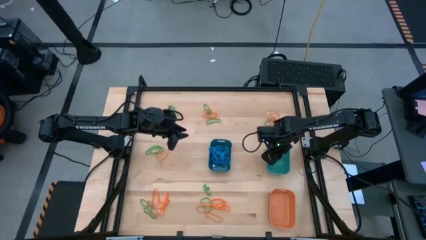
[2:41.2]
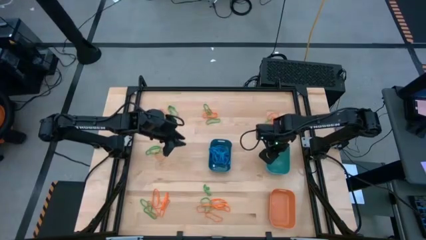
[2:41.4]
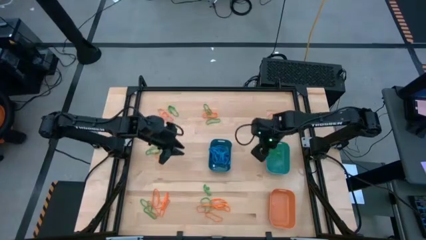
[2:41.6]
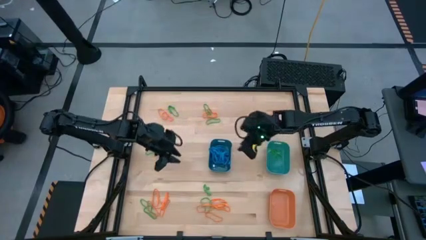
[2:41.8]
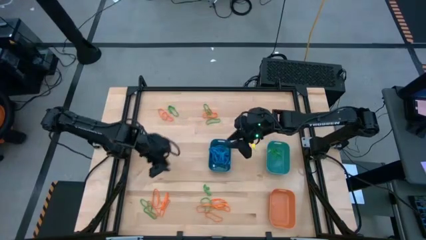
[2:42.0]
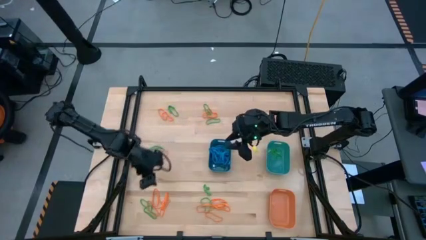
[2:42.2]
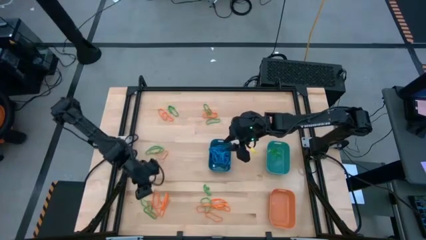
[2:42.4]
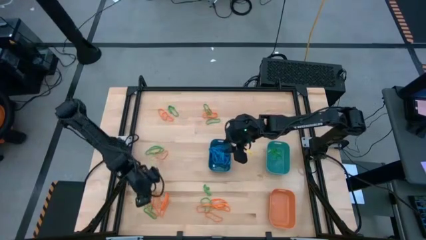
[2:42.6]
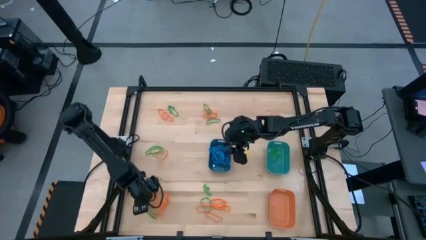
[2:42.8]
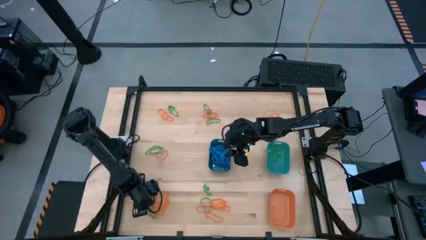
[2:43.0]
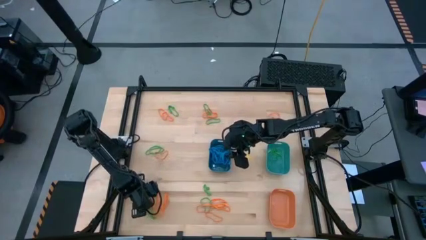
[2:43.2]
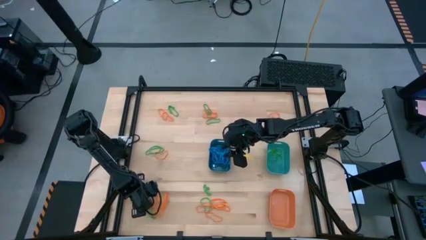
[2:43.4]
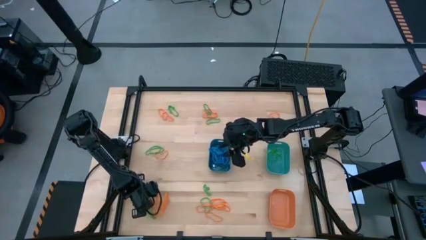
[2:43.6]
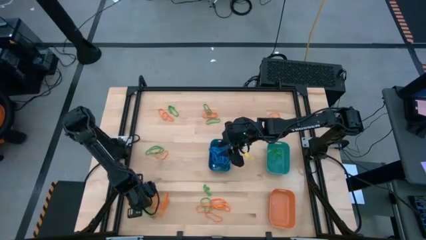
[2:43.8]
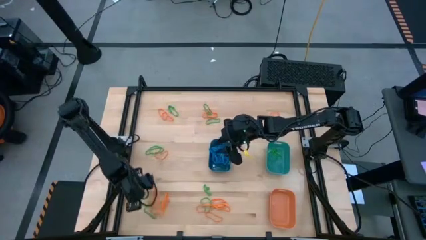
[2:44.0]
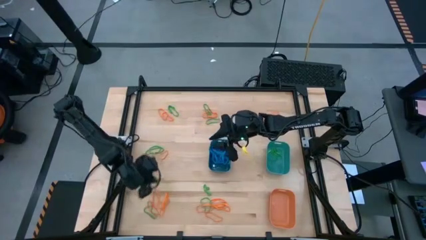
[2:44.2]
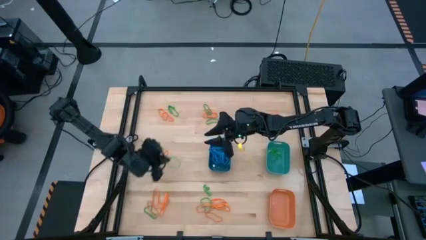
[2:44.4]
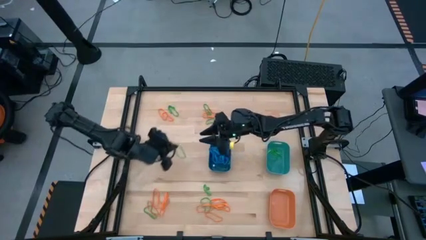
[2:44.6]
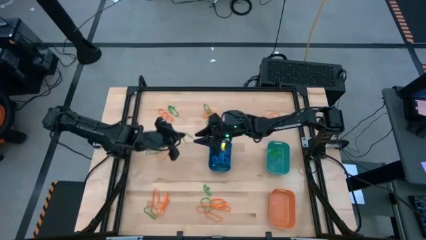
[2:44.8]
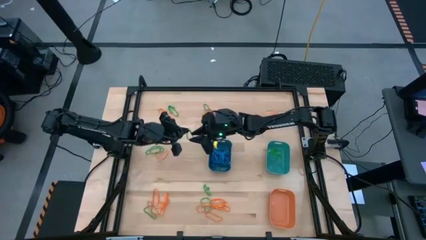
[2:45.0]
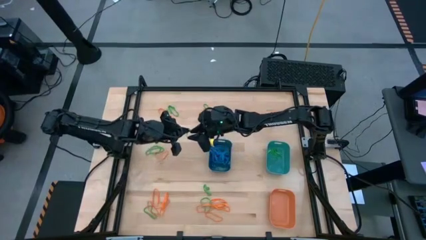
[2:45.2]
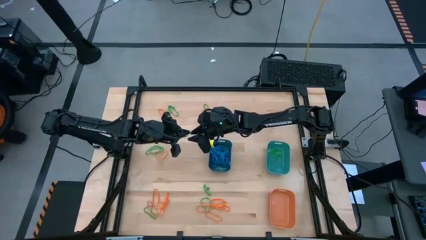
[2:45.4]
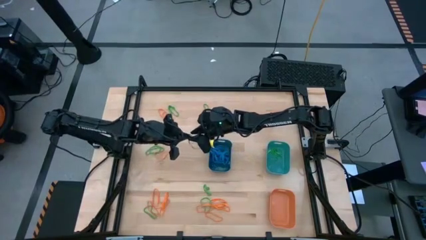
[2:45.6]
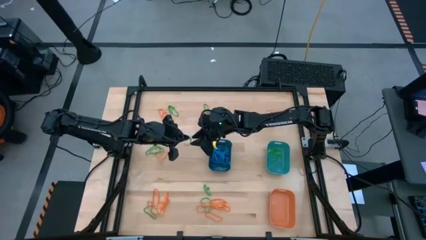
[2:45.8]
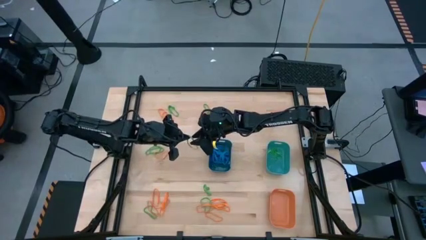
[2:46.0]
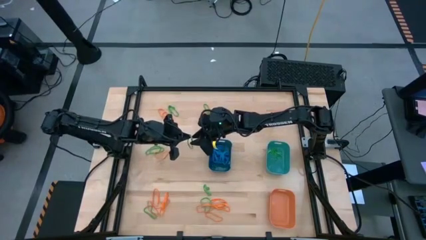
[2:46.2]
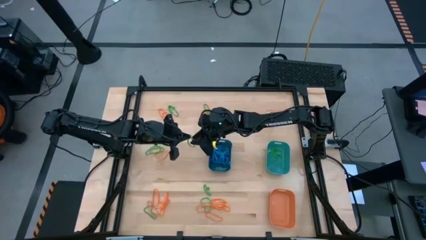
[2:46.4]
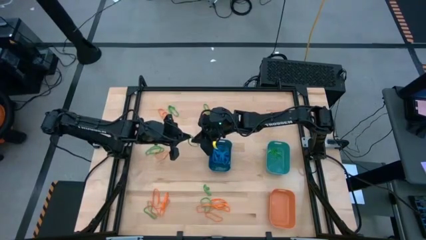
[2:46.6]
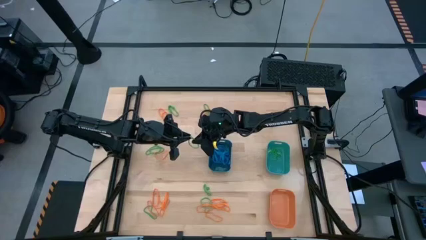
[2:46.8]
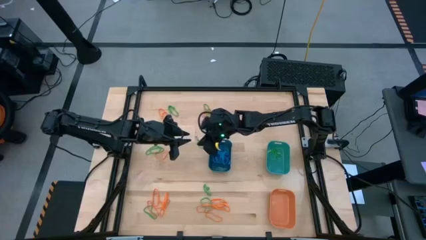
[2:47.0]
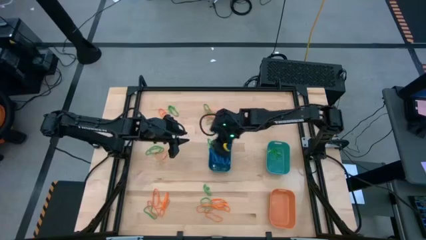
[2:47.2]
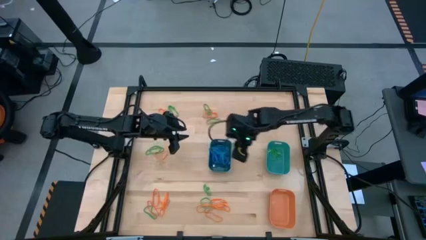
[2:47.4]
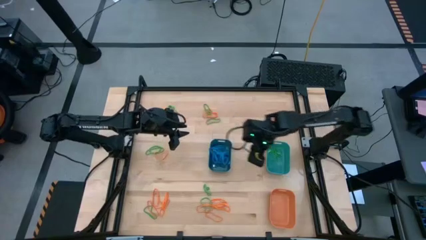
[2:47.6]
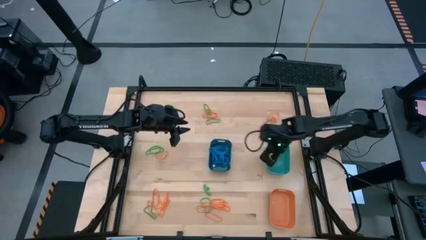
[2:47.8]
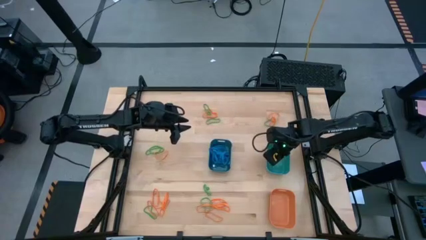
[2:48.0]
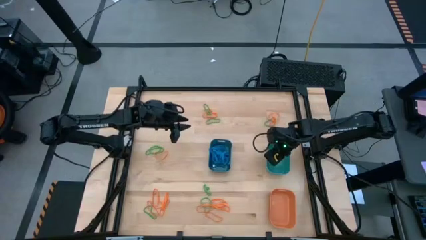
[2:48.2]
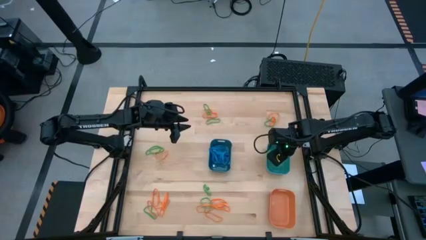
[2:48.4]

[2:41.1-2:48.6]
Task: Sort rubber bands into baskets
Put the green rubberband into the light blue bin

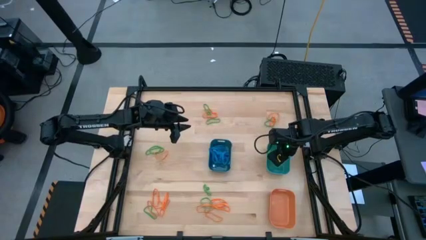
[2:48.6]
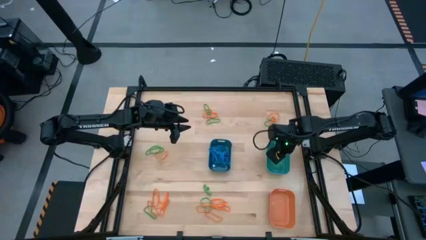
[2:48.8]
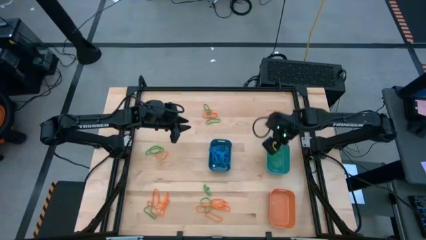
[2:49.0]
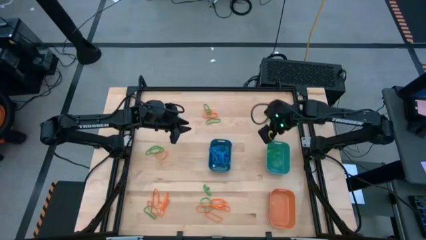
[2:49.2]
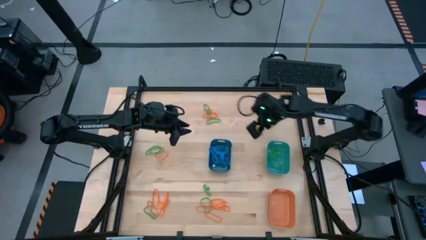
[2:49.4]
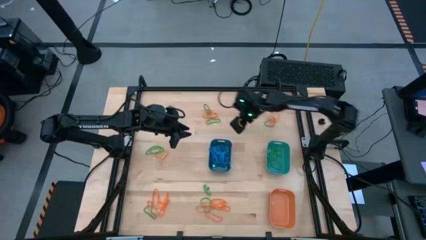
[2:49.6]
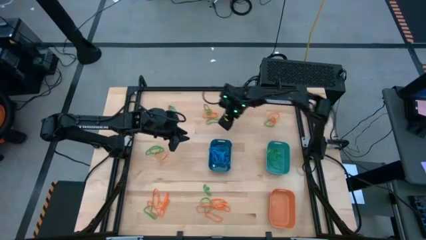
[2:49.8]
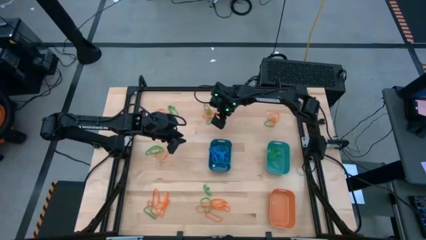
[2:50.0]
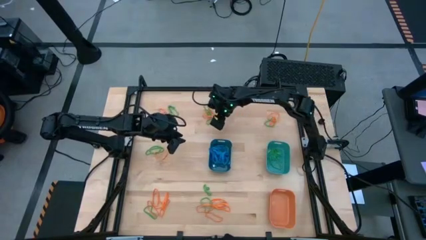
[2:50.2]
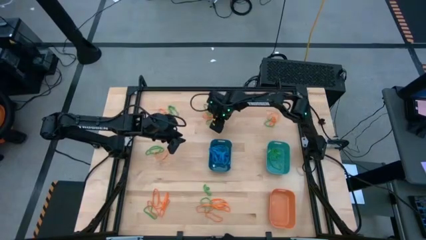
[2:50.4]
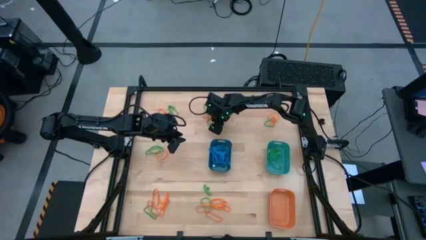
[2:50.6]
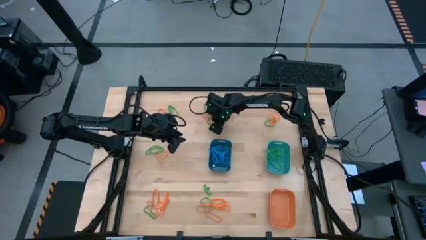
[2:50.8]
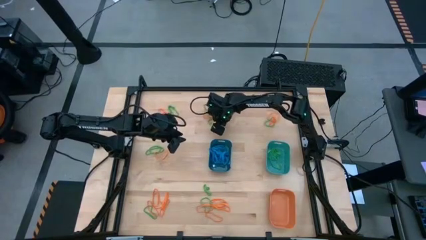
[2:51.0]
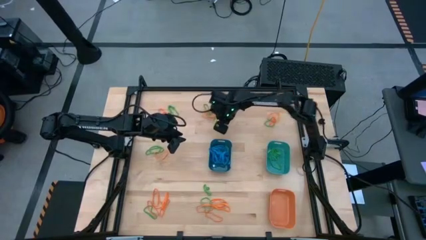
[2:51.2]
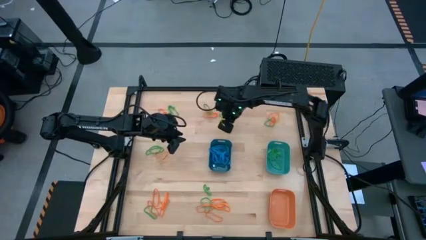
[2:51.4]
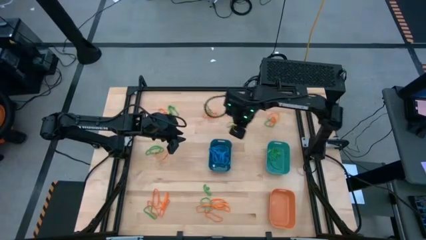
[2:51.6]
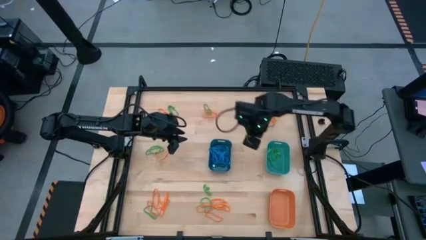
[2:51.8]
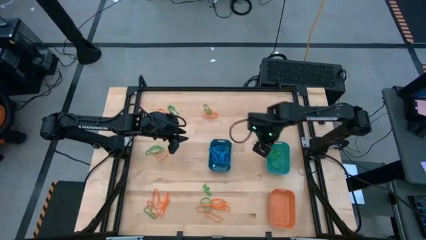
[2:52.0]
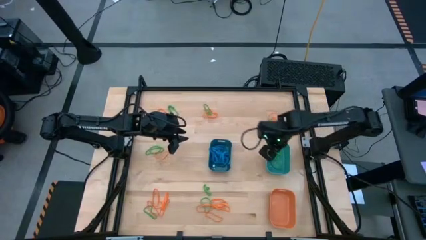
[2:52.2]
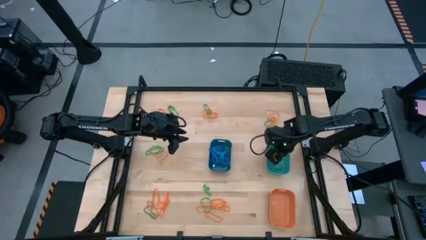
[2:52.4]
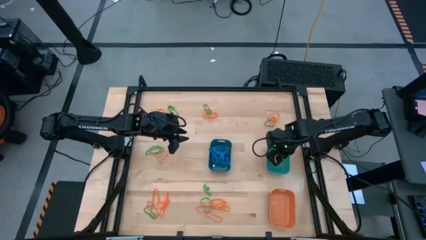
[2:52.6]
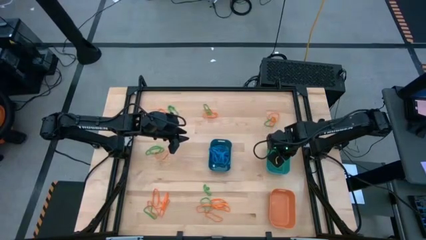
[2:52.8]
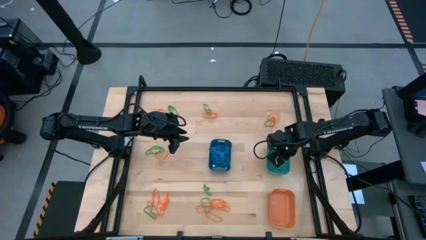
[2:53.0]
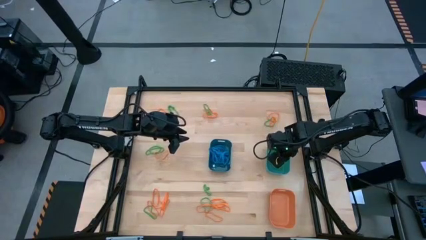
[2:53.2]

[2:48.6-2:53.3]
Put the green rubberband into the light blue bin

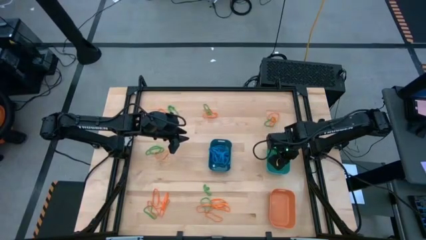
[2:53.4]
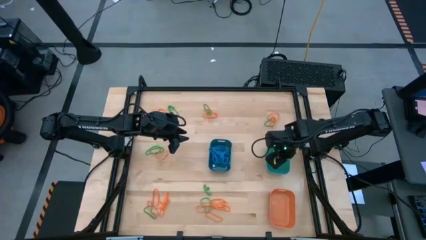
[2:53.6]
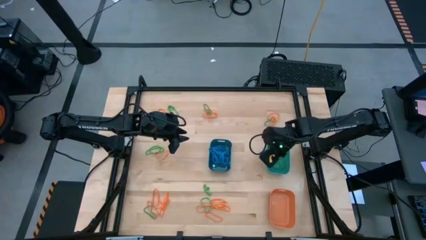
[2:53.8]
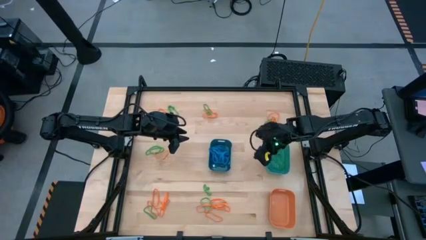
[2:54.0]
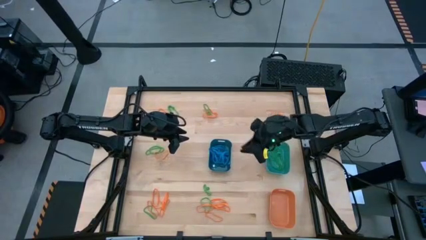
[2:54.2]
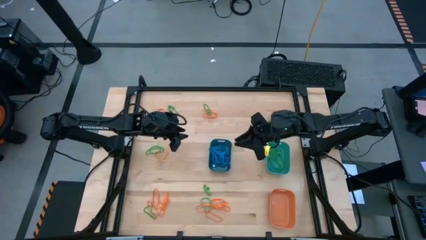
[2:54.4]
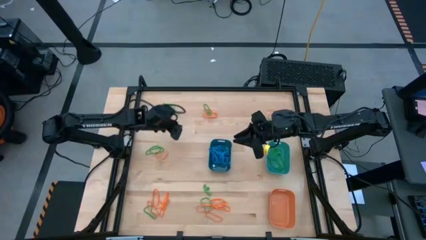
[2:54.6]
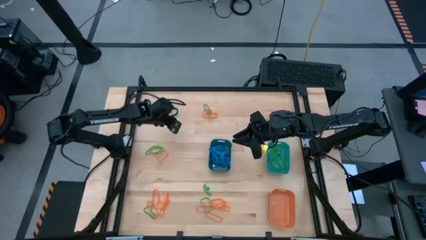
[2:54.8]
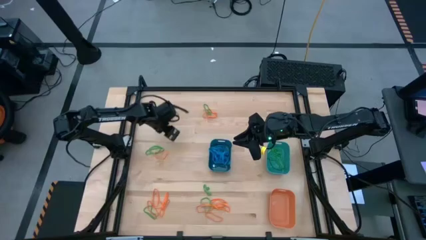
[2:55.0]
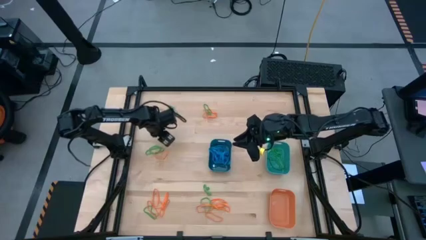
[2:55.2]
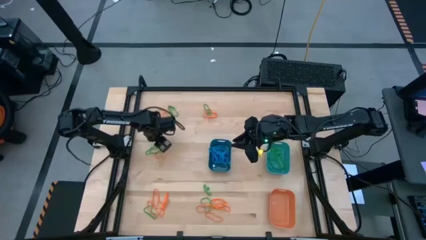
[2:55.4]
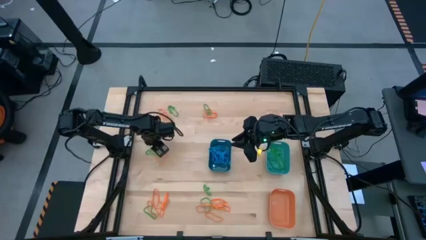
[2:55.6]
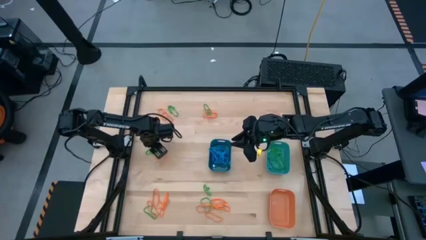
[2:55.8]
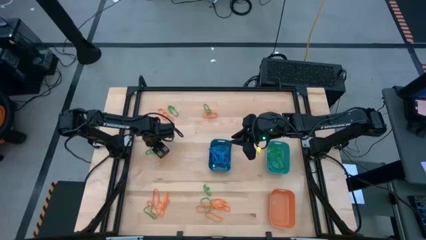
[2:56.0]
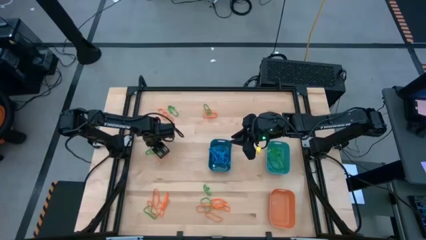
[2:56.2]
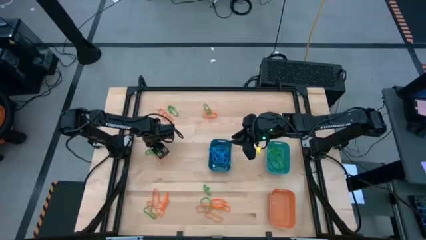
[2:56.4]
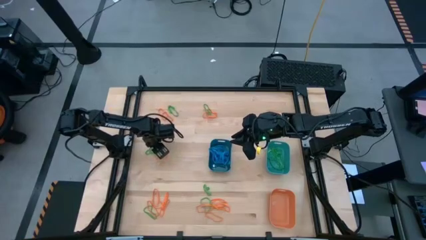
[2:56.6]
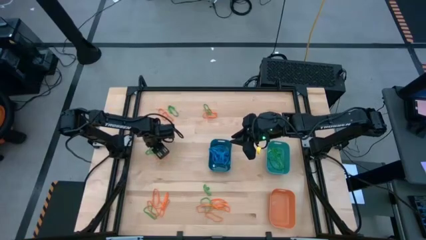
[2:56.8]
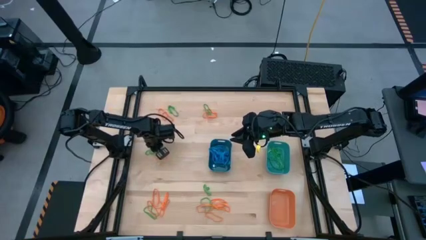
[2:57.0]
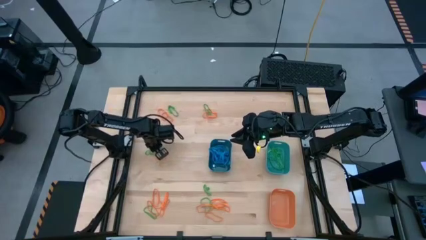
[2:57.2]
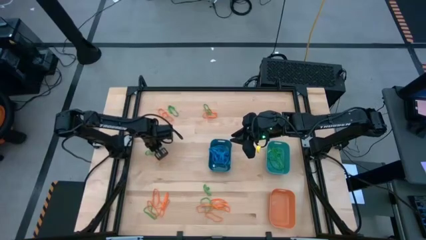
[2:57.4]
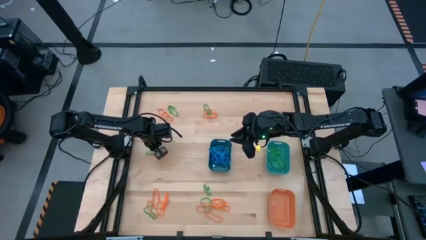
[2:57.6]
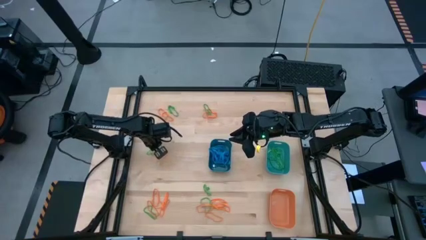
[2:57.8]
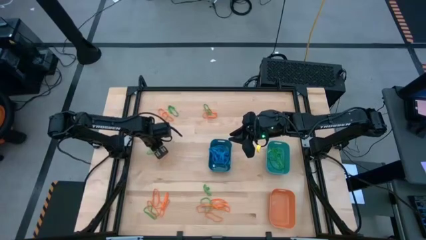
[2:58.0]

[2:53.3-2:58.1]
Put the green rubberband into the light blue bin
